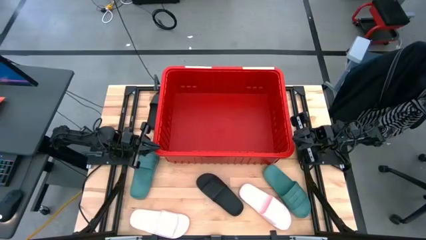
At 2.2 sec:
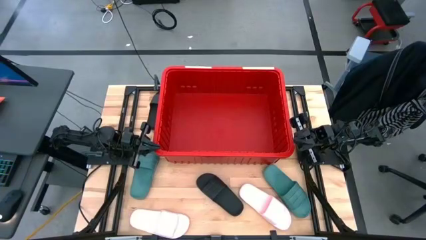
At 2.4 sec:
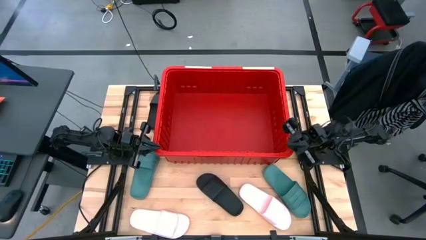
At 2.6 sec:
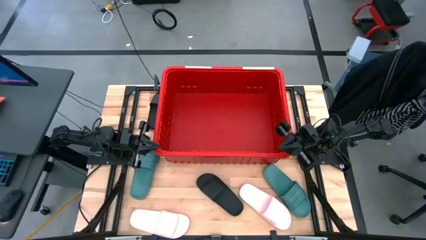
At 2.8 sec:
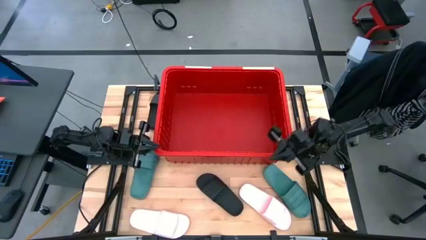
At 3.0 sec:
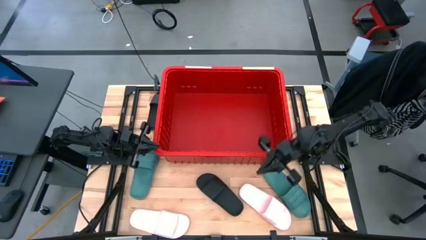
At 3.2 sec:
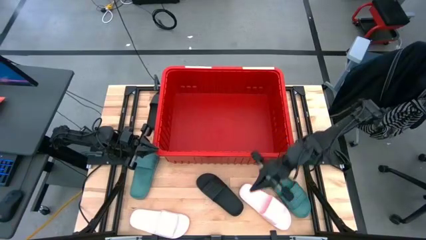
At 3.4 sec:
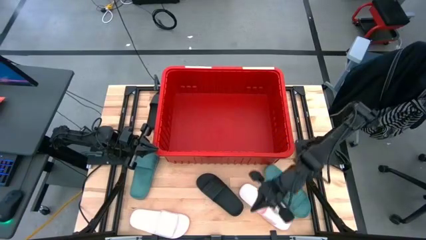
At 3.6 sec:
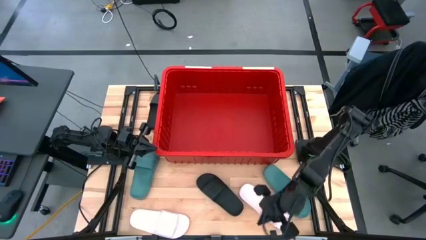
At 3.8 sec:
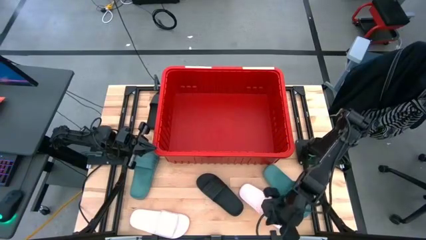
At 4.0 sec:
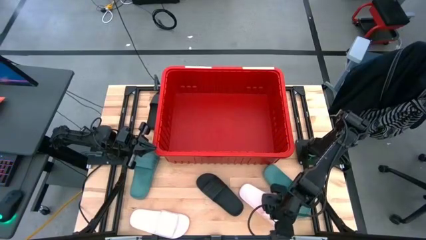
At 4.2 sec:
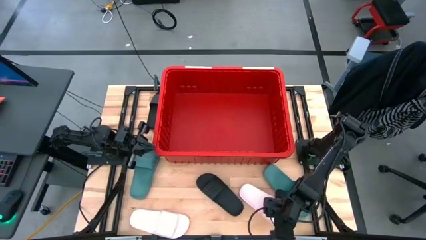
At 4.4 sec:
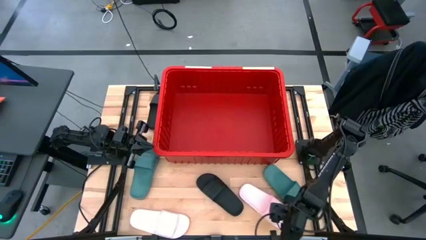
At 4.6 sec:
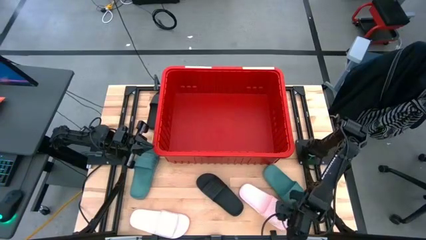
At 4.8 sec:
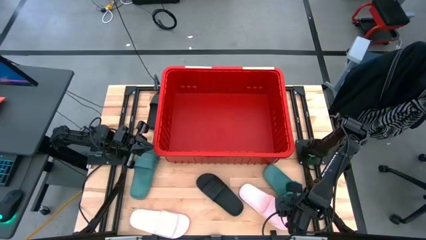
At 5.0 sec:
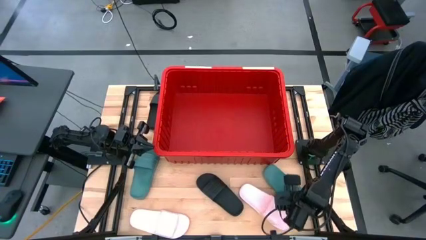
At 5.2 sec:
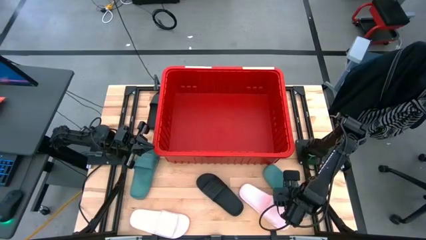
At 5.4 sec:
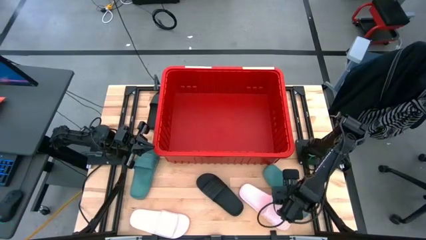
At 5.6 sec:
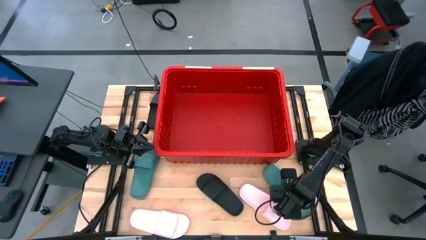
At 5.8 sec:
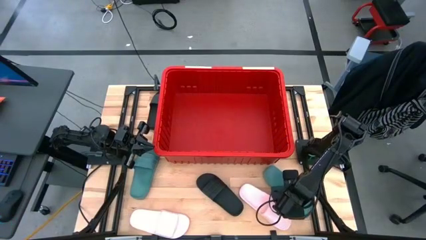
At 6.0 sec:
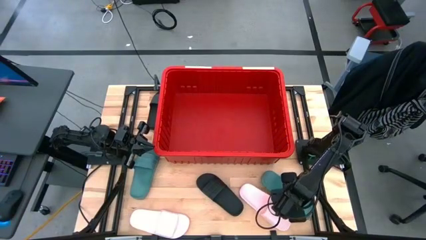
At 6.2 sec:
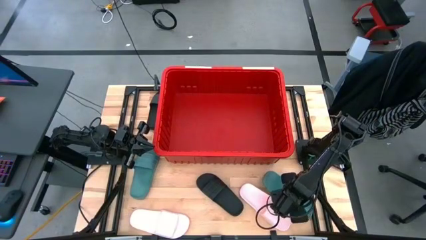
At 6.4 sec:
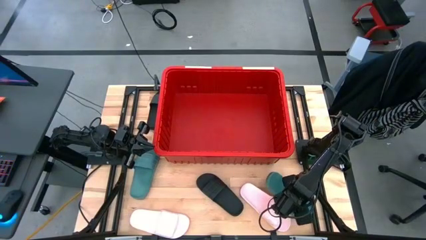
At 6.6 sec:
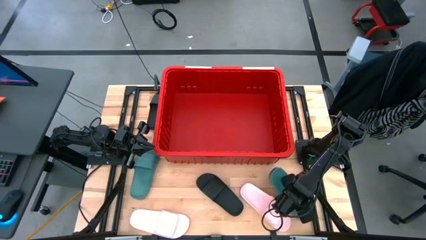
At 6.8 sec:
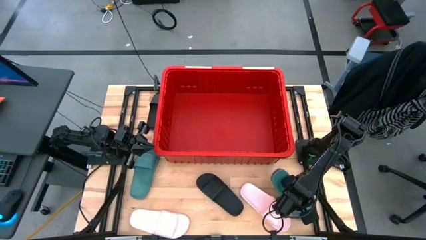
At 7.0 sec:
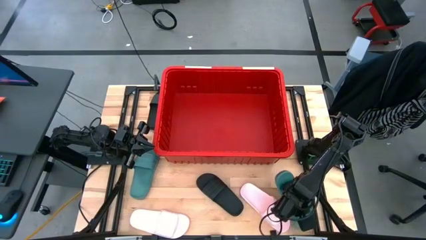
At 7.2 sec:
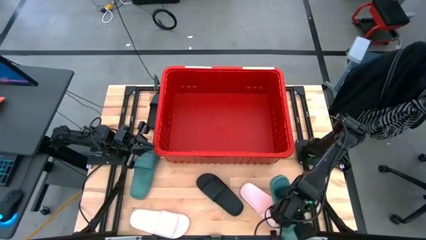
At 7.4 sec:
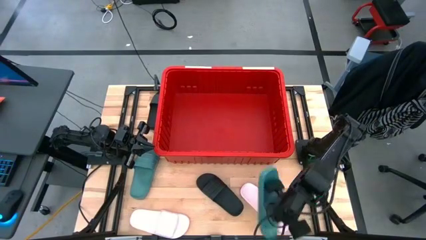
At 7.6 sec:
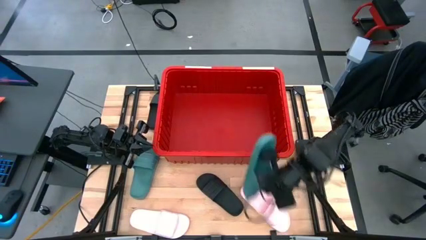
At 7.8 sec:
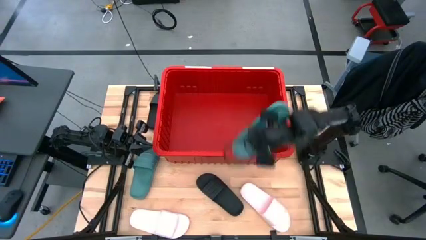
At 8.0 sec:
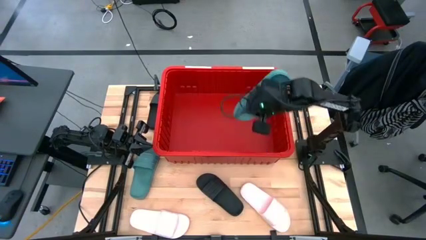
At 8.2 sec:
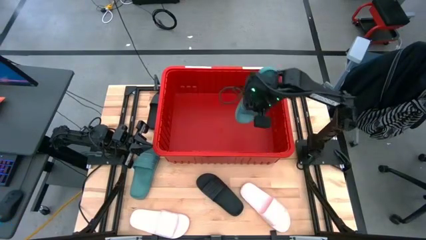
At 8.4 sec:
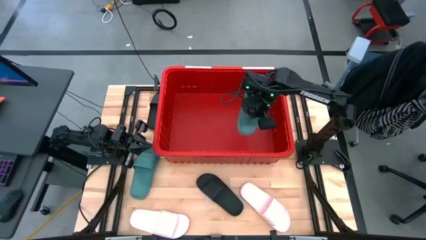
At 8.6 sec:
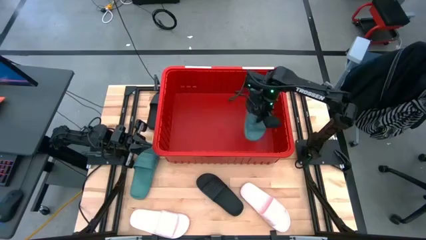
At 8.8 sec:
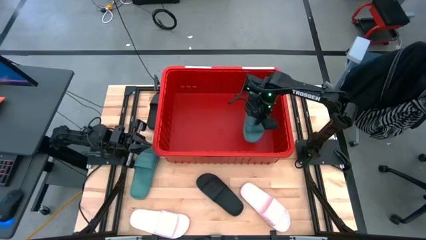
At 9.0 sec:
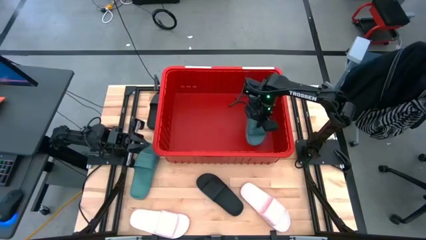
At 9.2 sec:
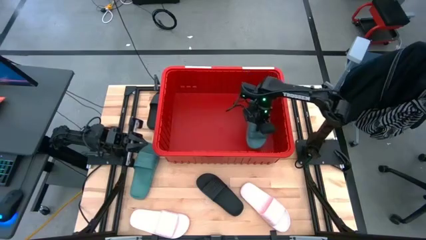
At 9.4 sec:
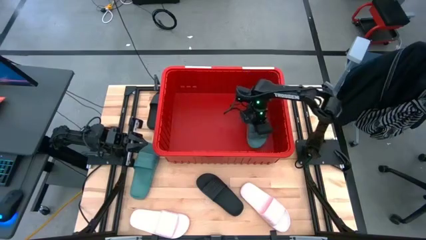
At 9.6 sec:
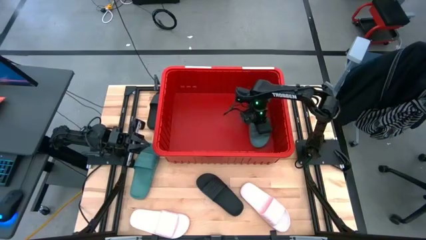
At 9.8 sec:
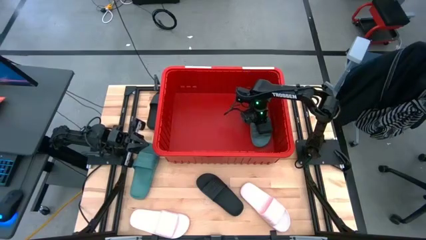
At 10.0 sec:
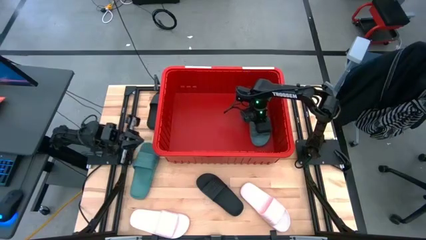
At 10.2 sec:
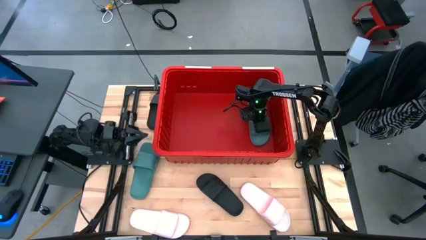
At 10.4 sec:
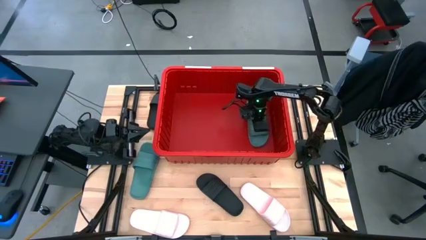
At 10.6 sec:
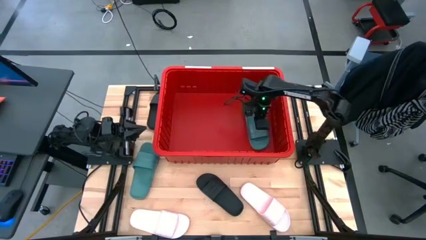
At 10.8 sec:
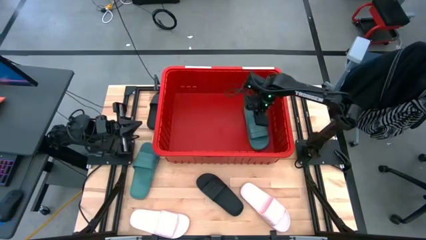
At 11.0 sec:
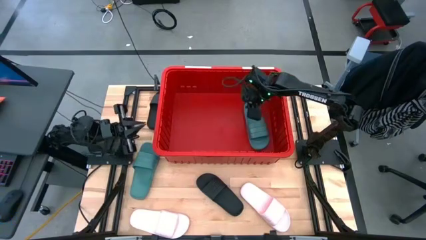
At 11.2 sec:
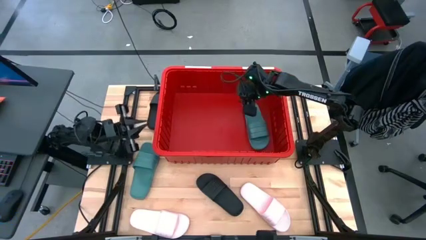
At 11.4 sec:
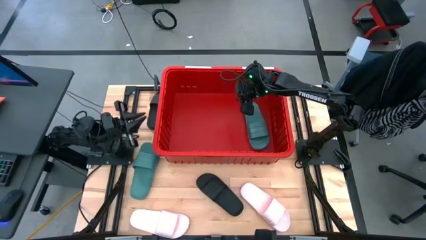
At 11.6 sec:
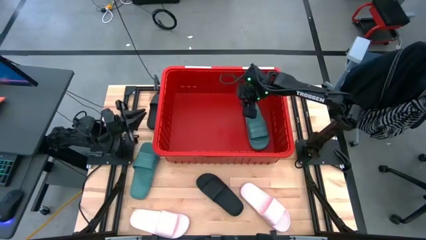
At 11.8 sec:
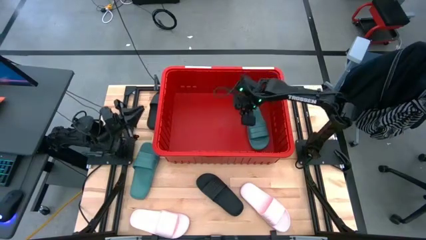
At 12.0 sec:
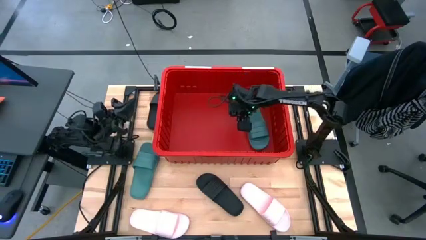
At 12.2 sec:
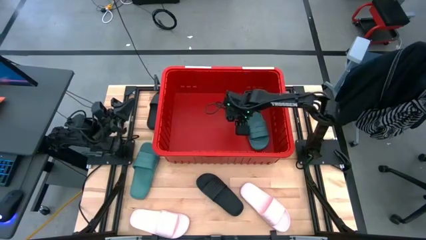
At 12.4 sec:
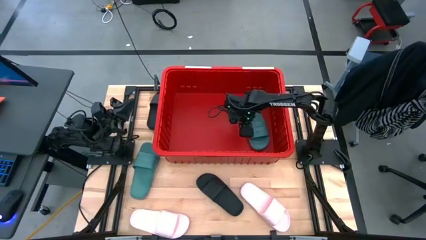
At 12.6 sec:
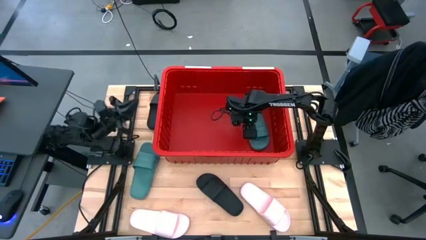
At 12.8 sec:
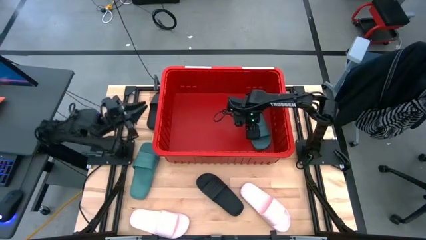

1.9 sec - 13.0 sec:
Task: Pick and place slides into bin
Put the right green slides into the red bin
